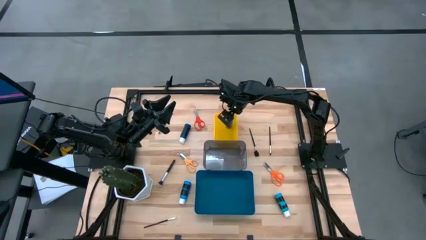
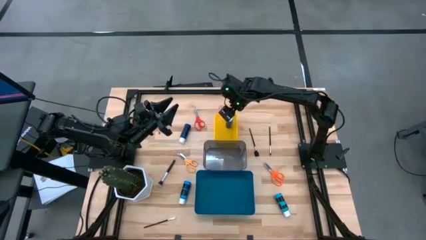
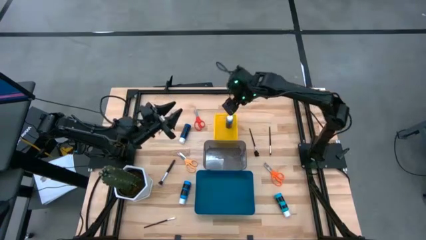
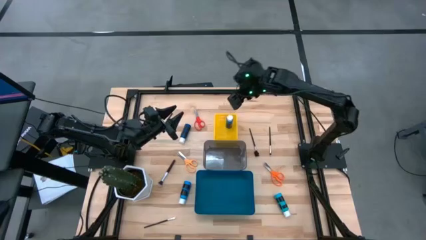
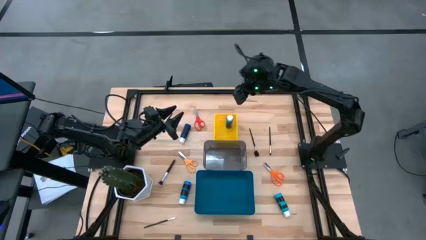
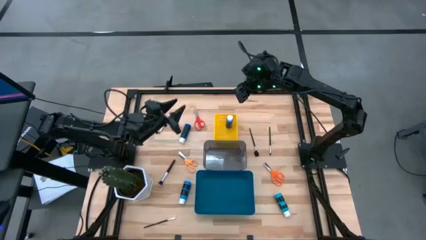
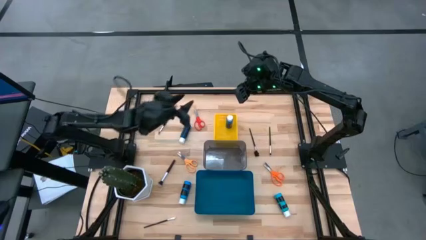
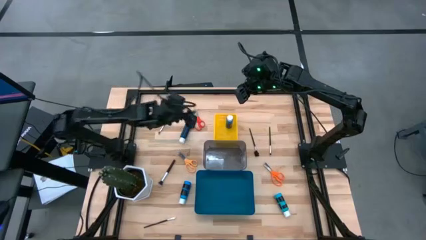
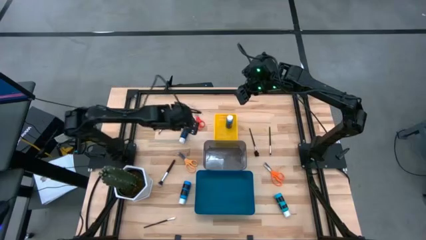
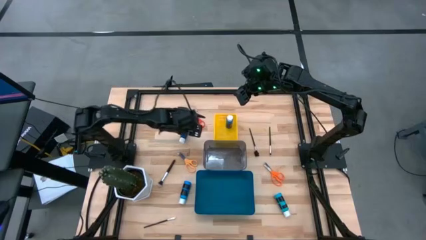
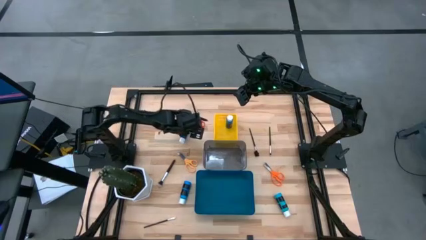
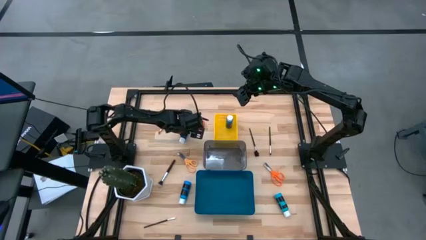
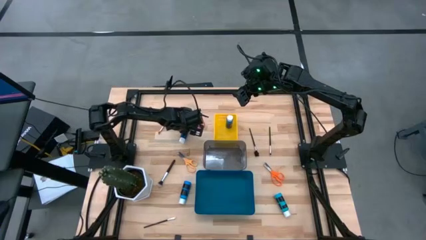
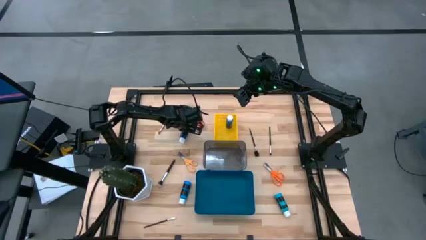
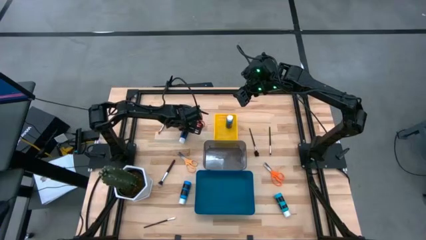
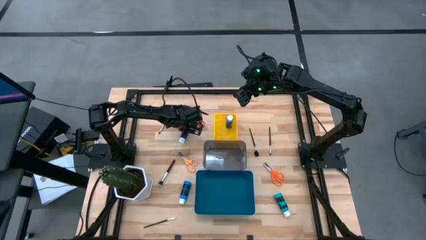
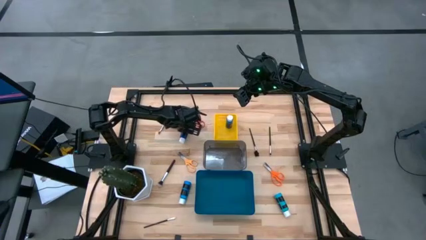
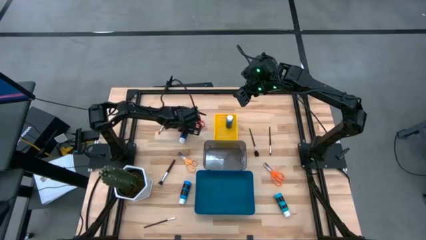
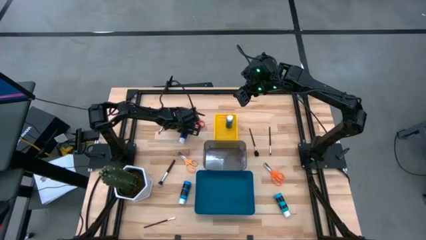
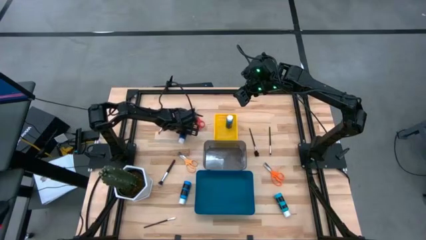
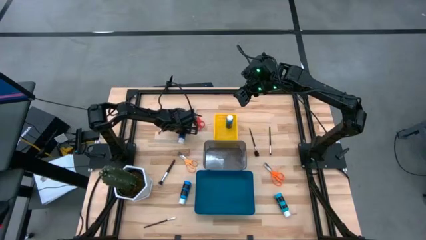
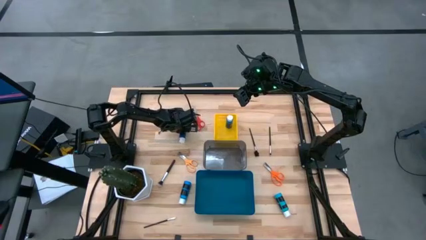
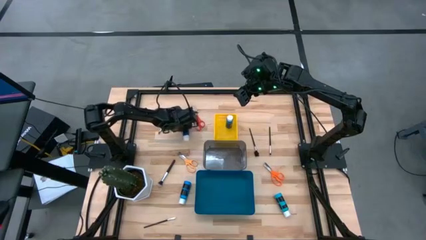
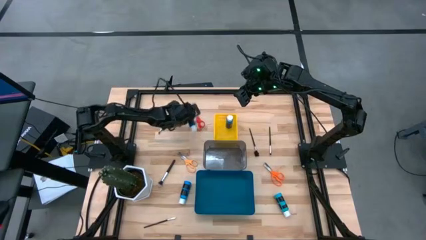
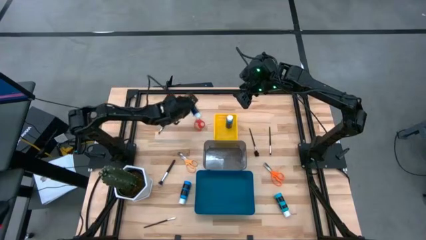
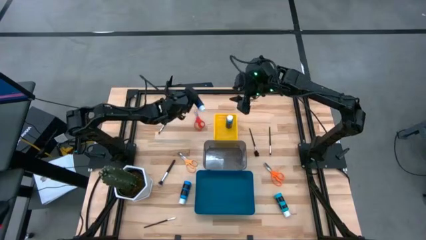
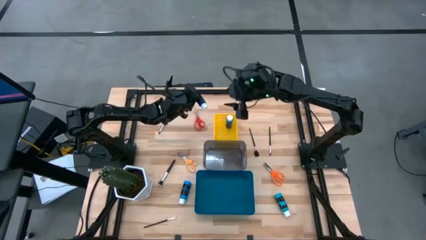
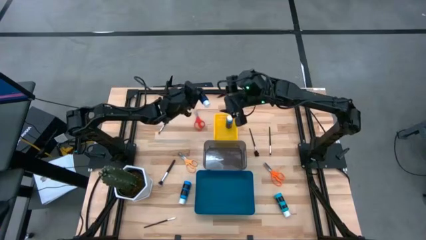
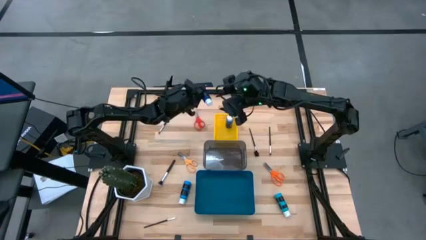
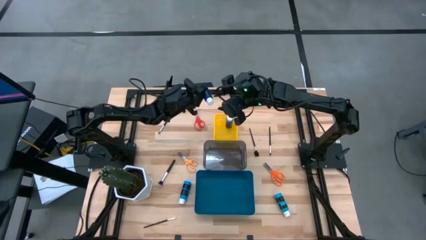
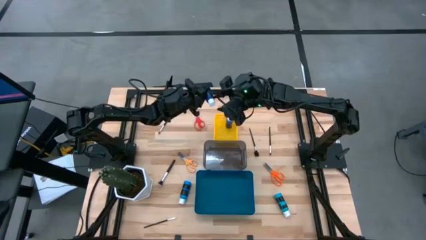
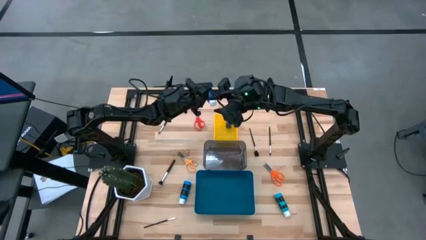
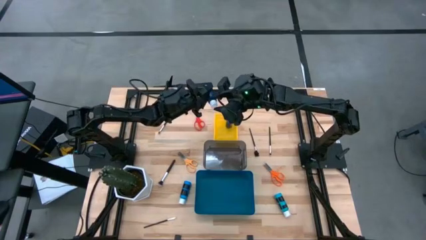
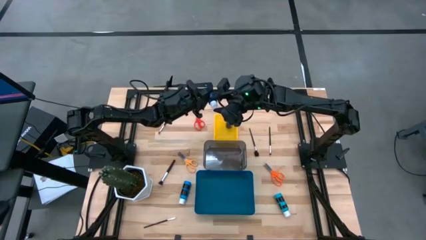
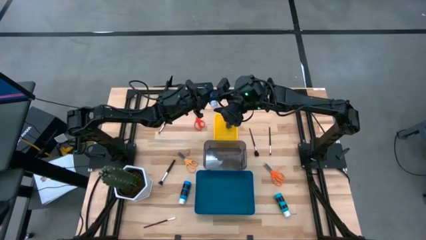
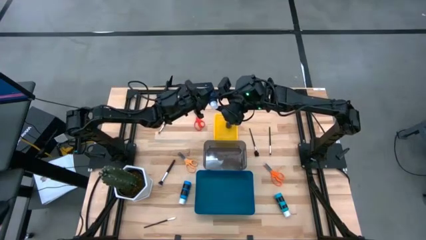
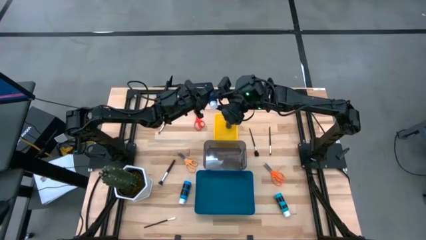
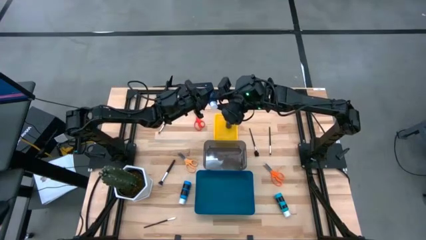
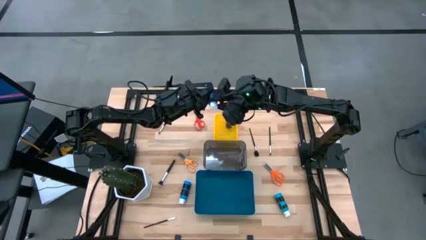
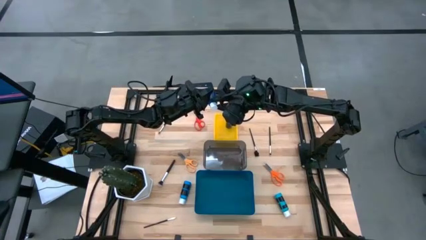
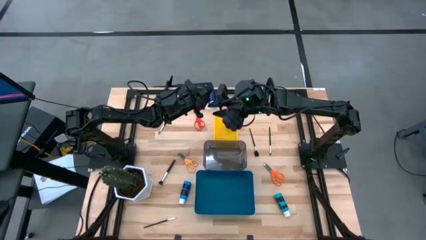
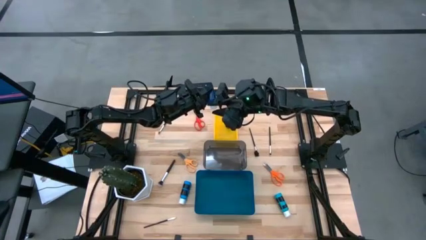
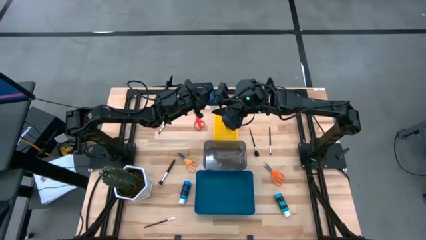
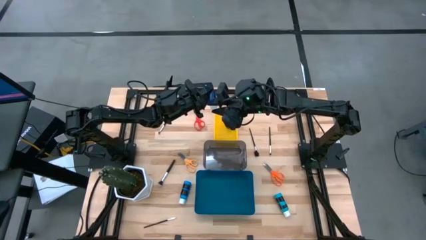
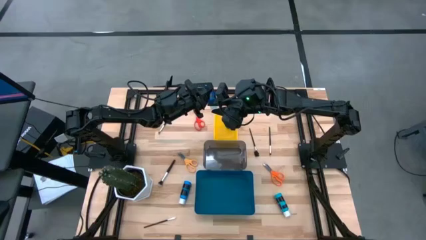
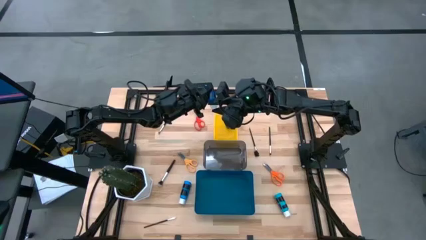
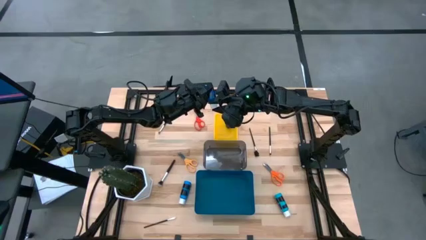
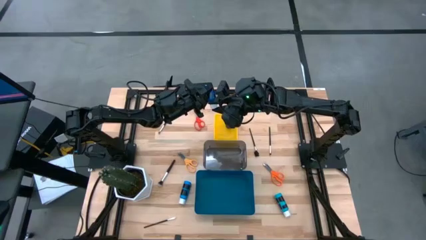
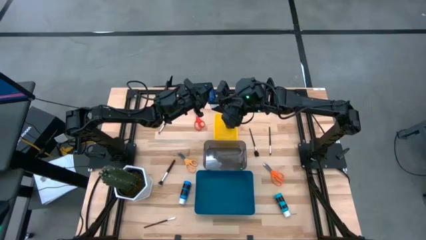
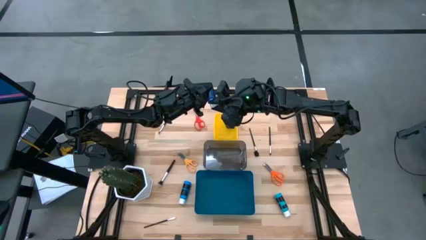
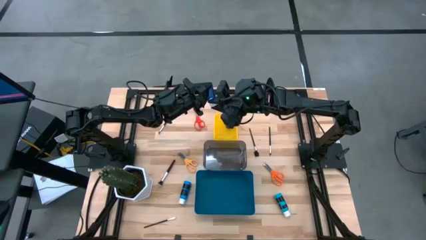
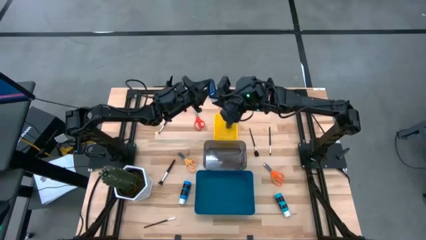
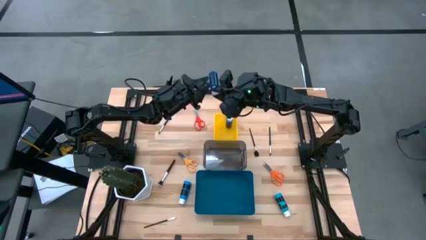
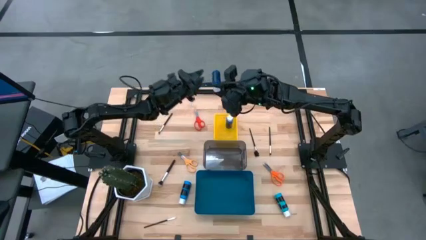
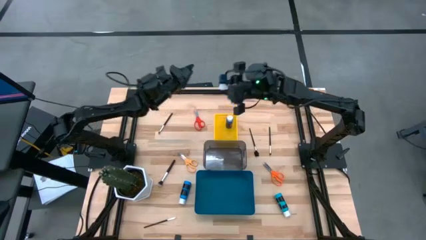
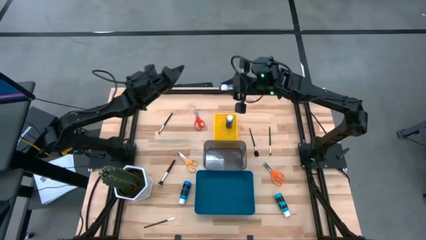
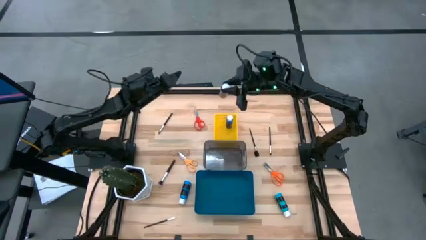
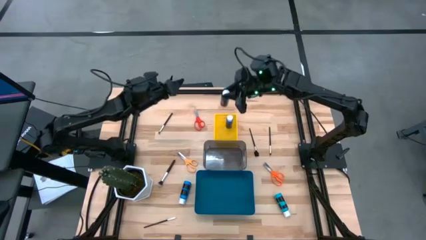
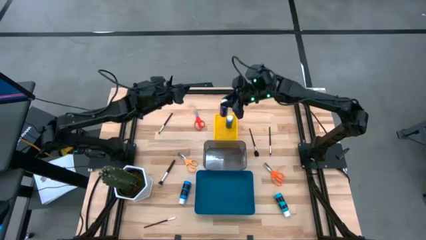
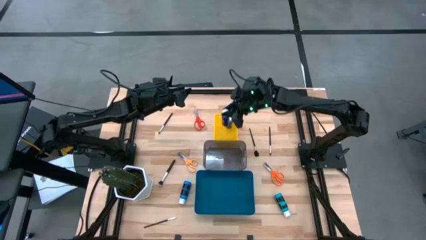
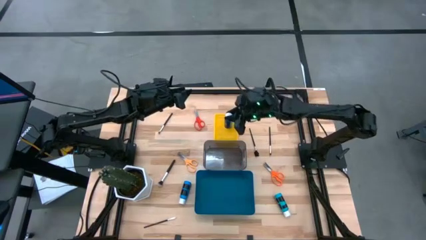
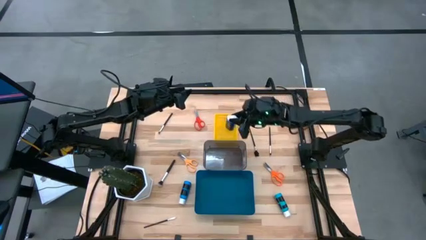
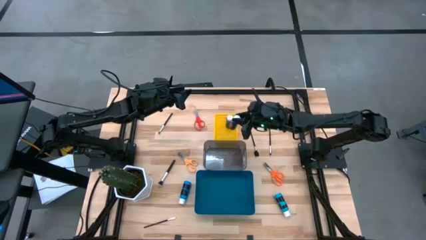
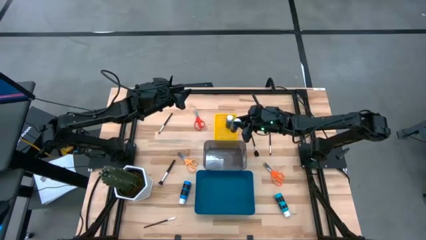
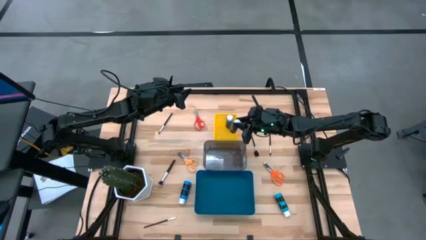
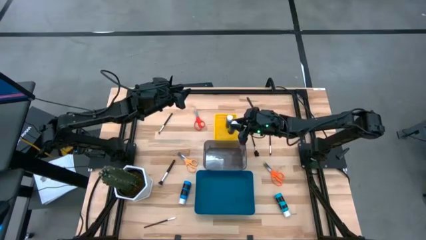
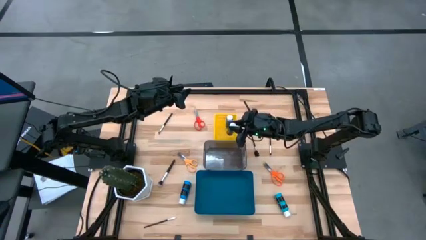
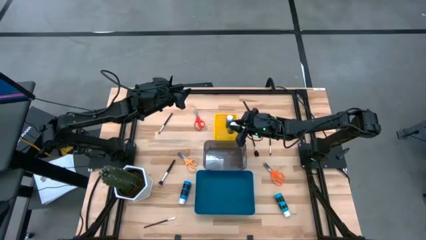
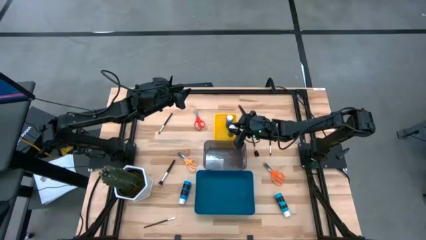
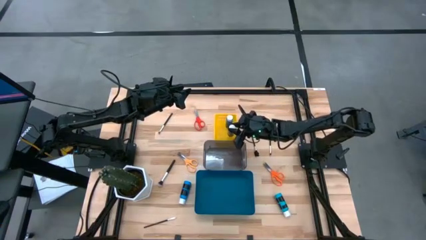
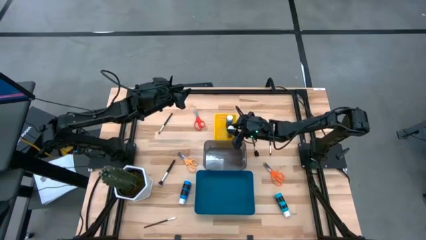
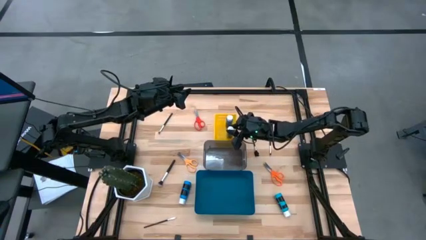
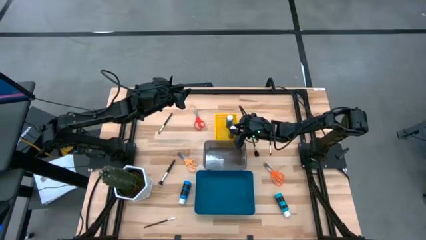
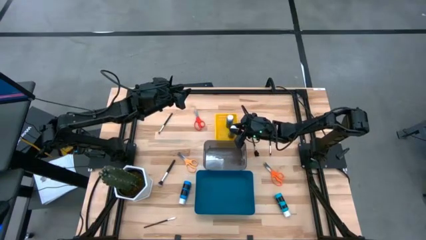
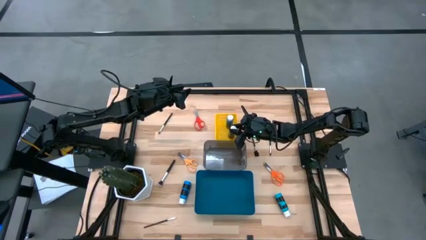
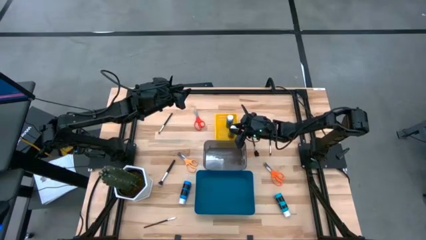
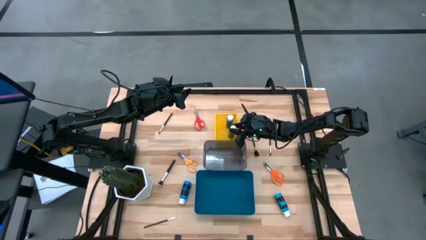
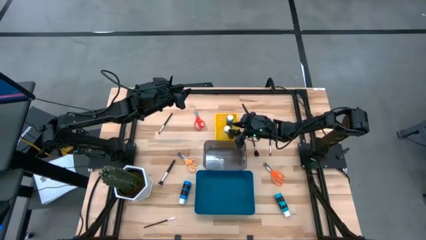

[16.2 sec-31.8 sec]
Task: Pick & Place Paint Supplies
Put the blue paint bottle into the yellow bin
